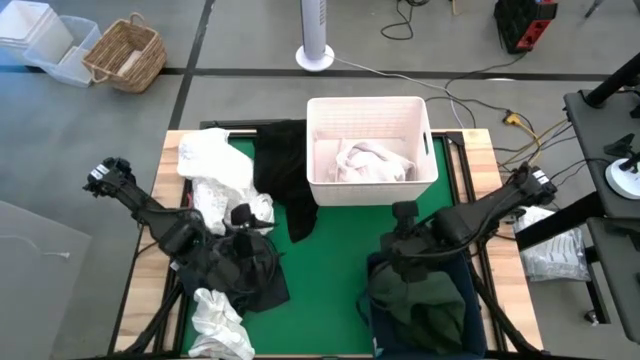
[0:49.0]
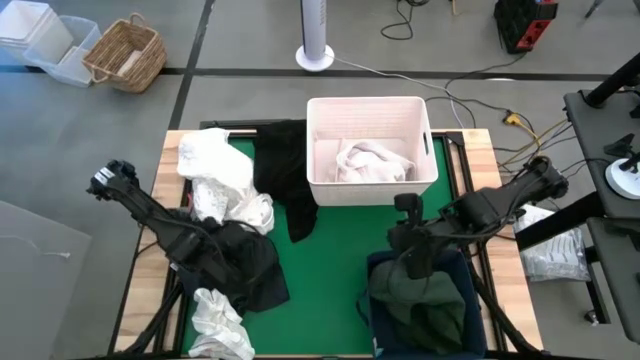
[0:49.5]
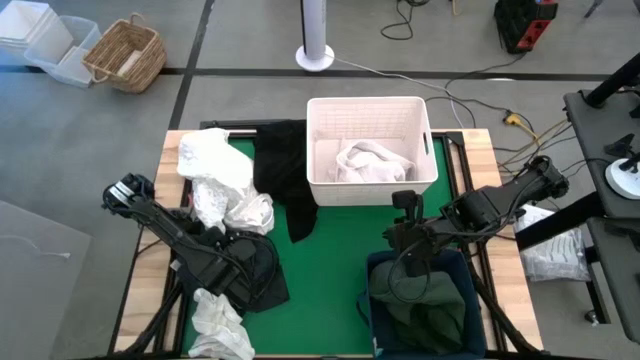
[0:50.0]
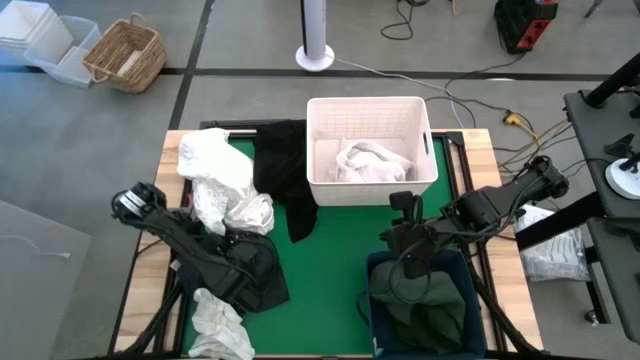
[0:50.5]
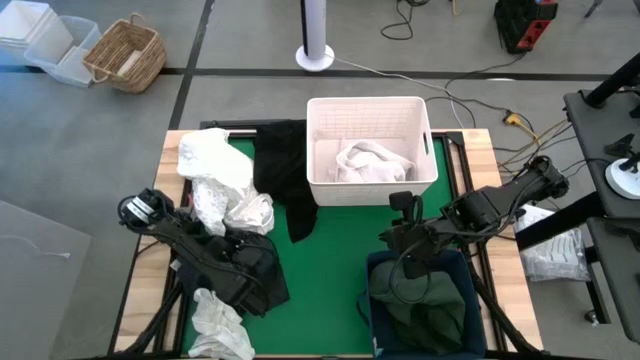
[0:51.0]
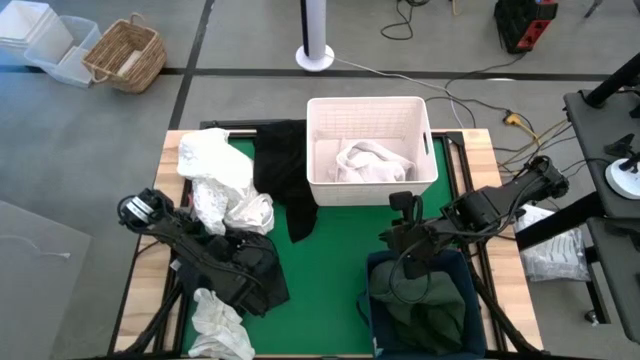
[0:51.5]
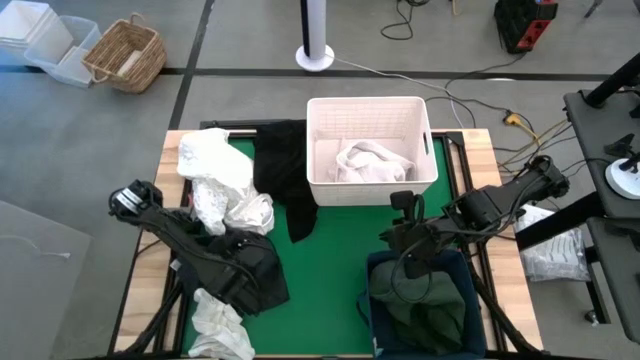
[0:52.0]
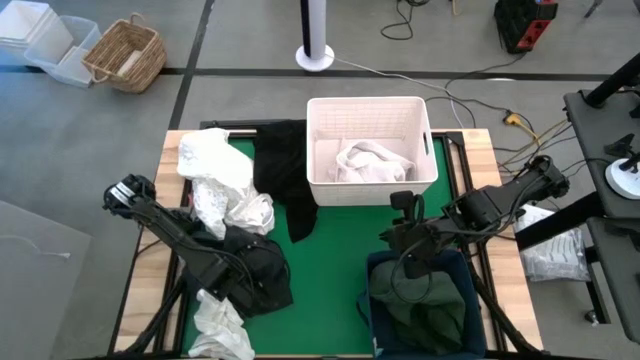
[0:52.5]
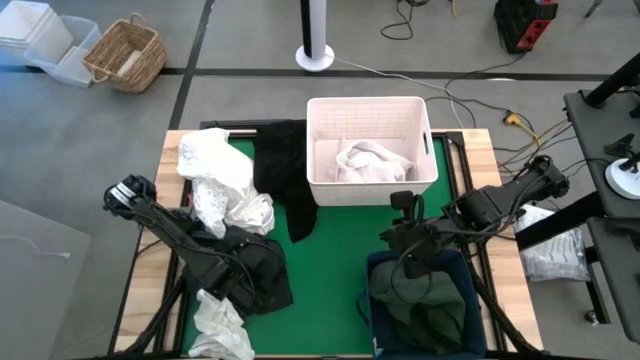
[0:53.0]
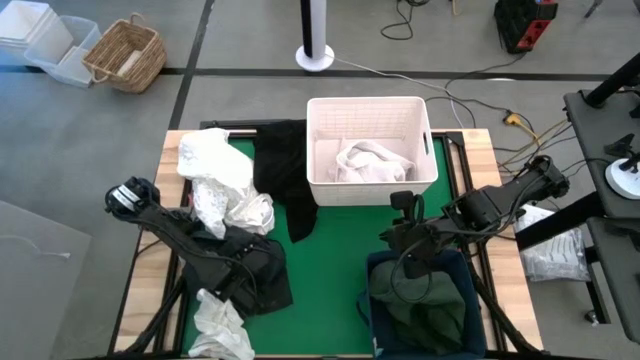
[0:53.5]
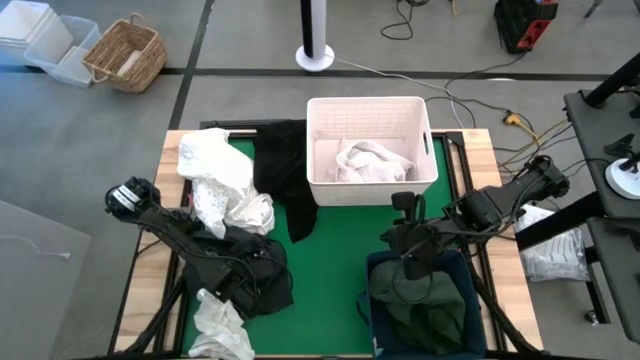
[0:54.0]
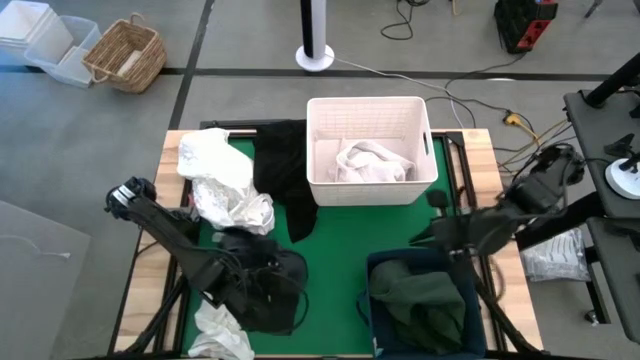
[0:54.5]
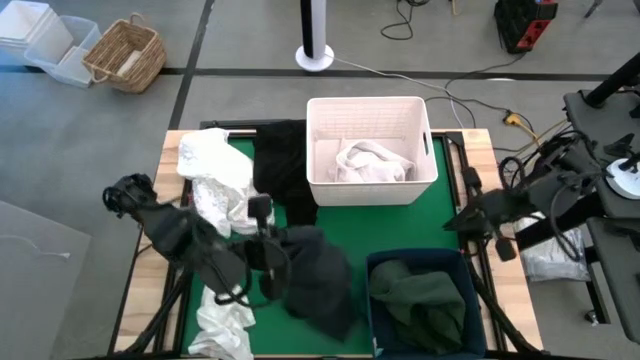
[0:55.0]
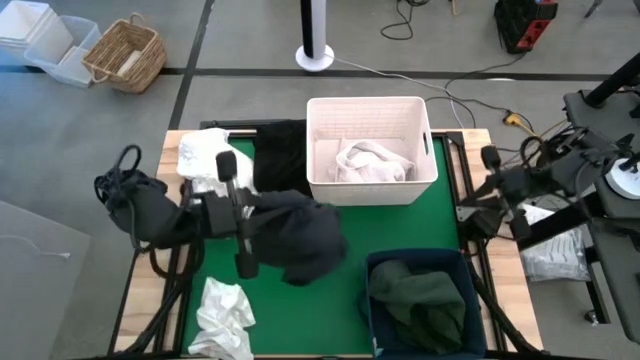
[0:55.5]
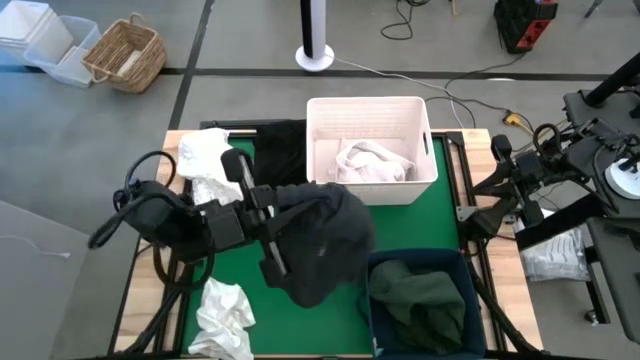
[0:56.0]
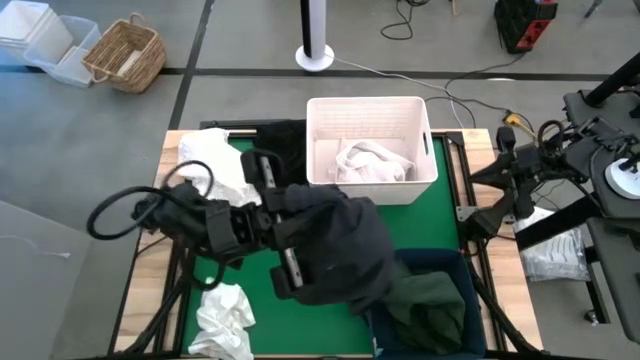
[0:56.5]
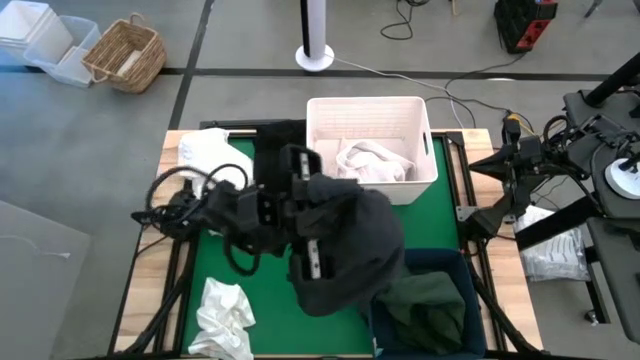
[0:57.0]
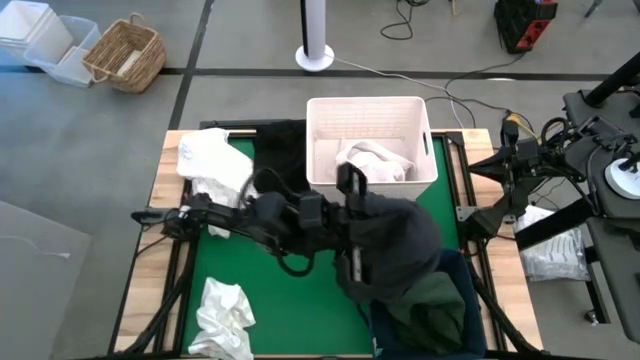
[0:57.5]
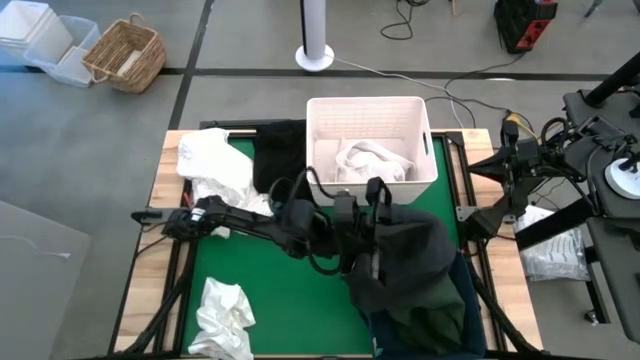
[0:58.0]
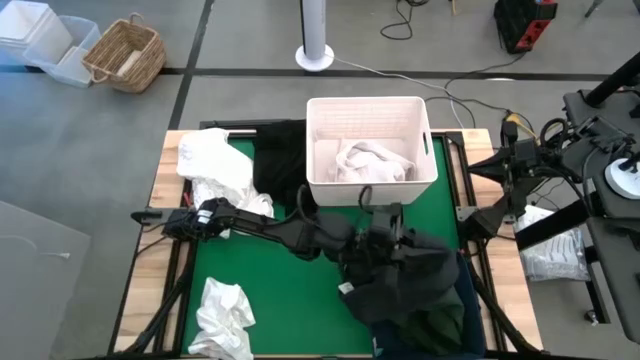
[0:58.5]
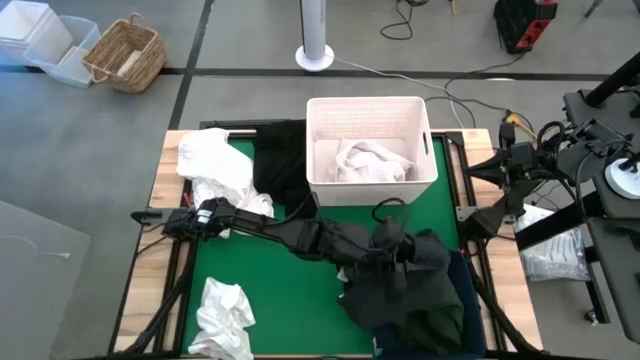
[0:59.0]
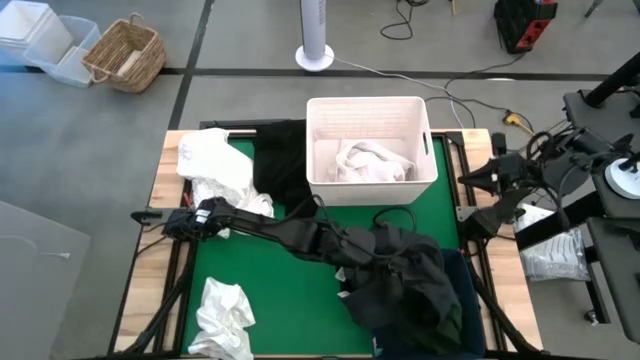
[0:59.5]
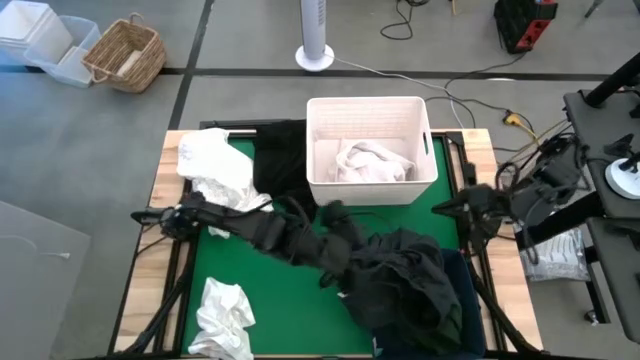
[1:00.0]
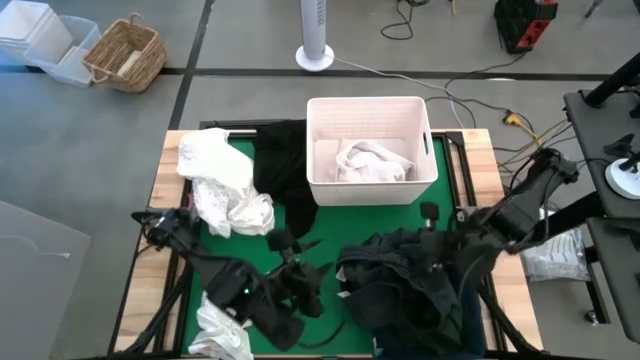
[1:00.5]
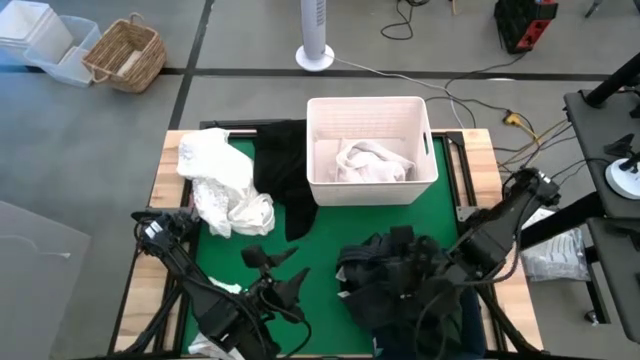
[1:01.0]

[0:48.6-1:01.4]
Put the black shorts into the blue laundry bin

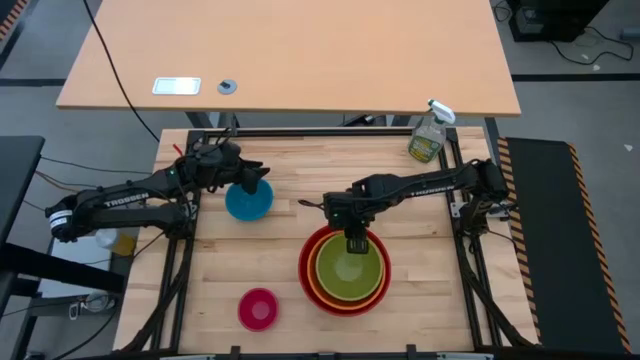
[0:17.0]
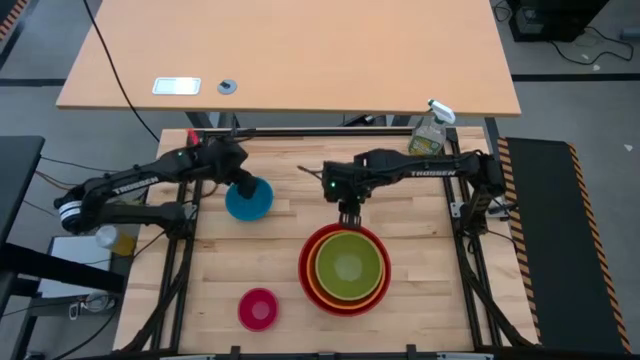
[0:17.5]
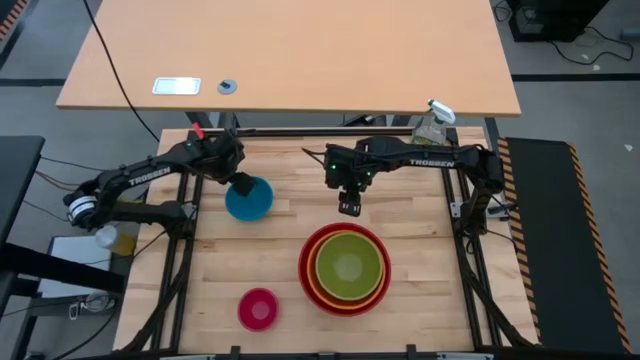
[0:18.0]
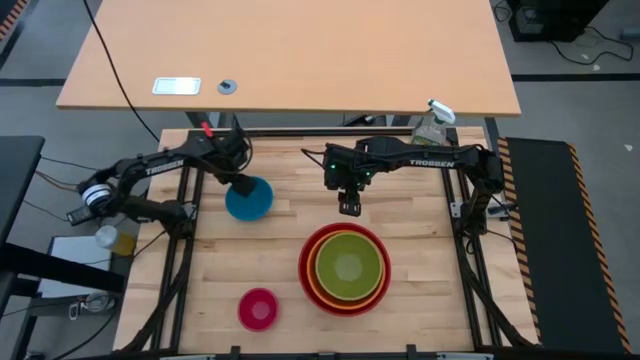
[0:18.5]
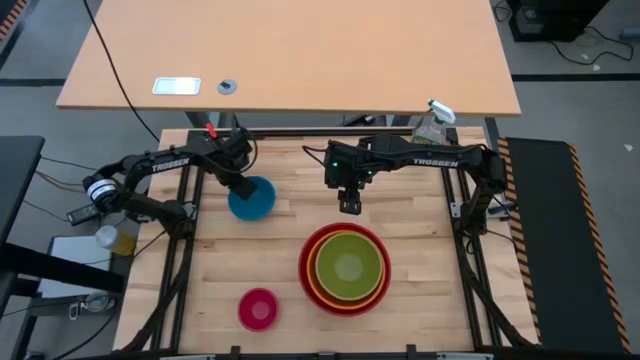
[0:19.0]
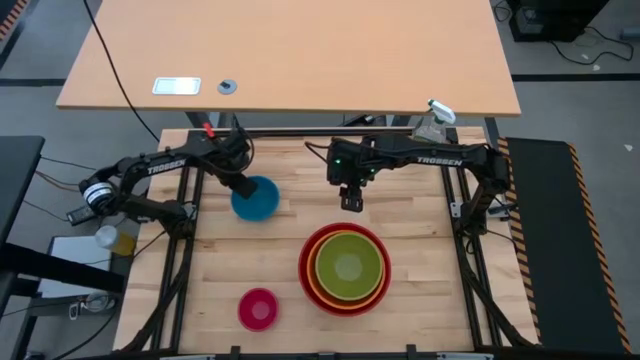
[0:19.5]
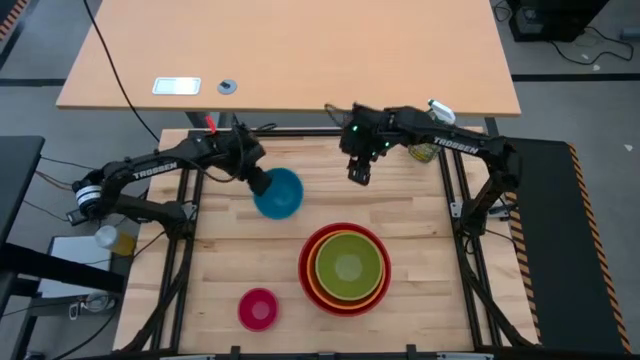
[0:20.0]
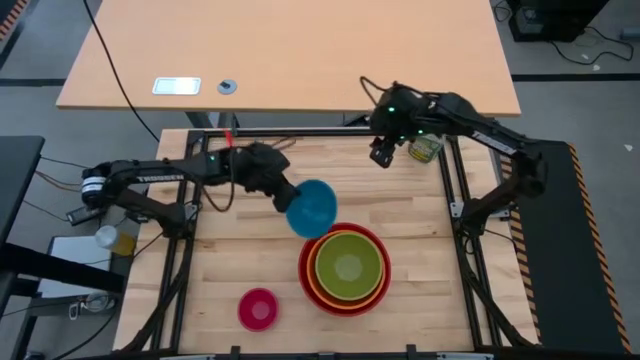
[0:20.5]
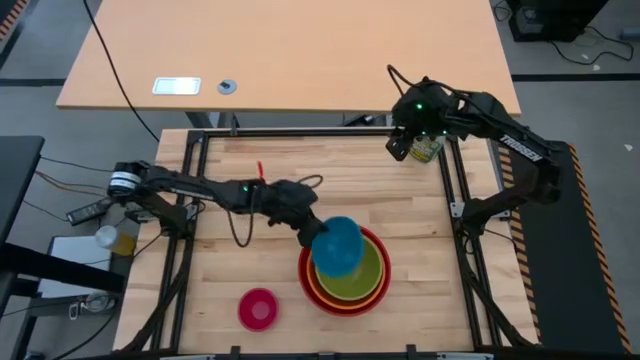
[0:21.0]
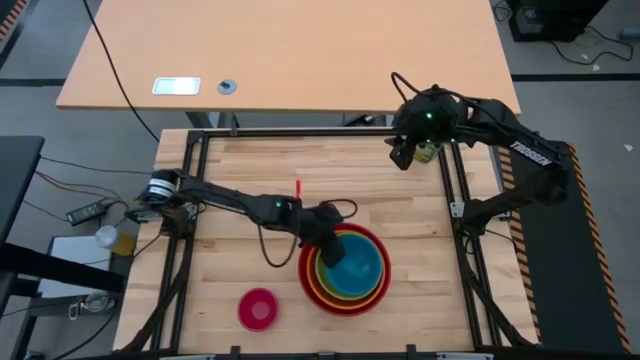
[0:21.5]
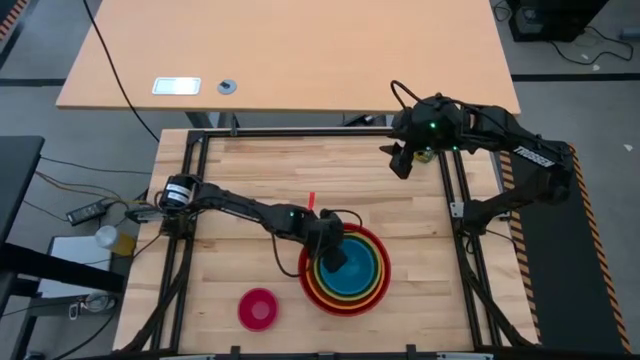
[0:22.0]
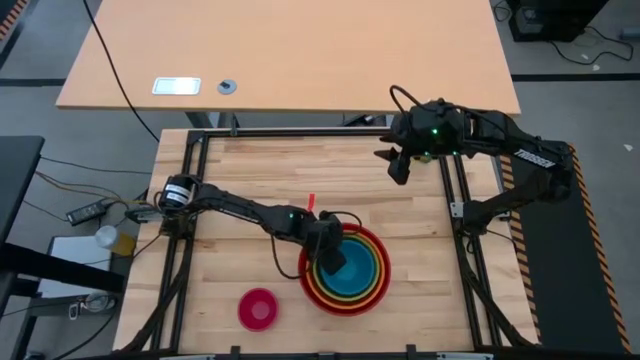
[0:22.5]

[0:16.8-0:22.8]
Stack the blue bowl on top of the green bowl

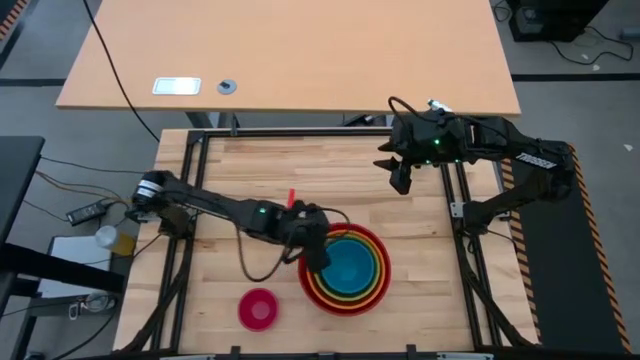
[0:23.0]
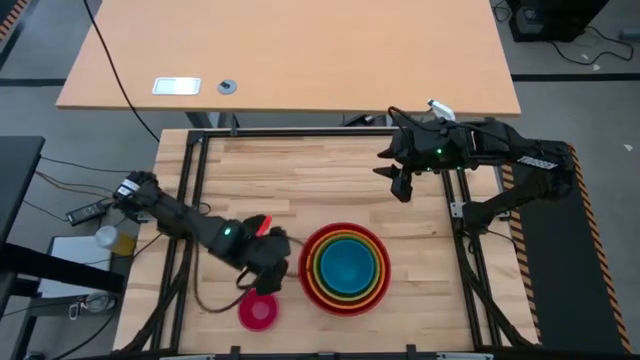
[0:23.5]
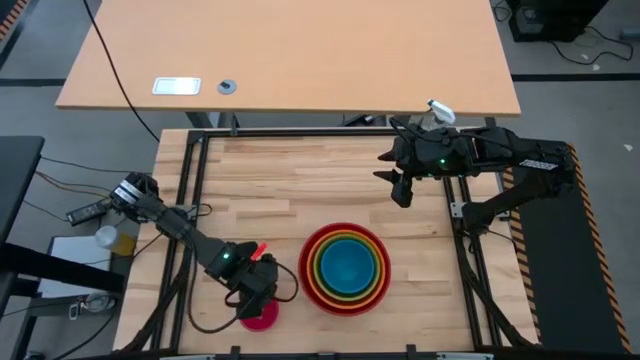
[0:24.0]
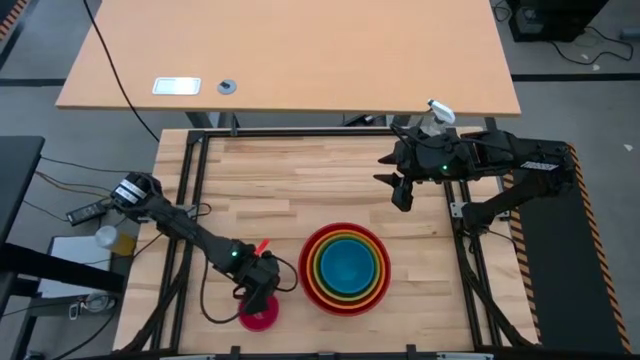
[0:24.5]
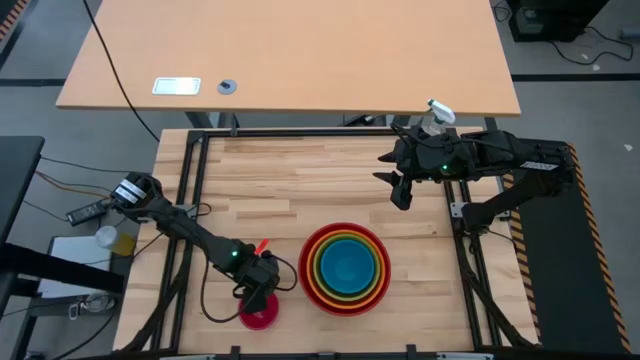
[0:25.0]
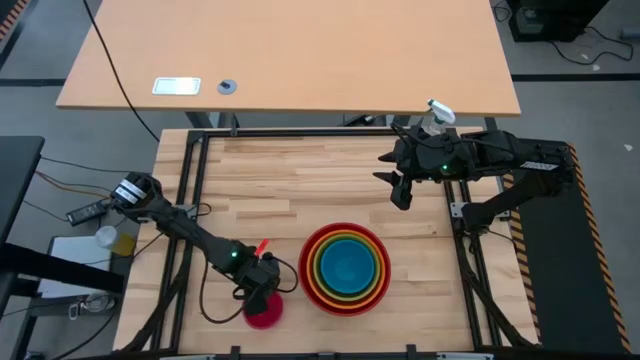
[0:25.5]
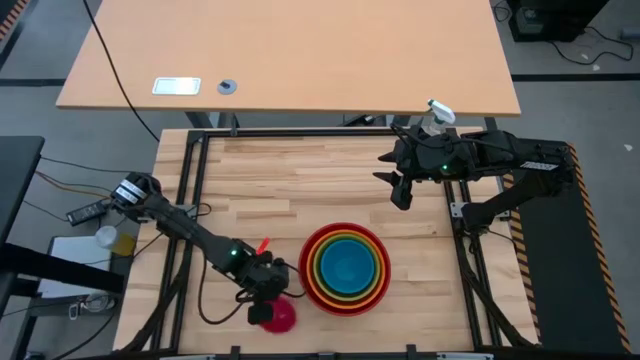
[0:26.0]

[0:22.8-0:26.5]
Stack the pink bowl on top of the blue bowl
